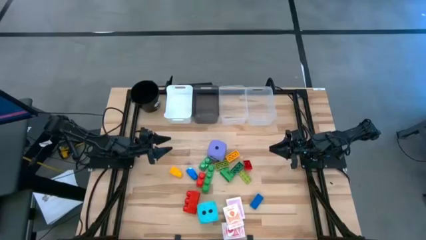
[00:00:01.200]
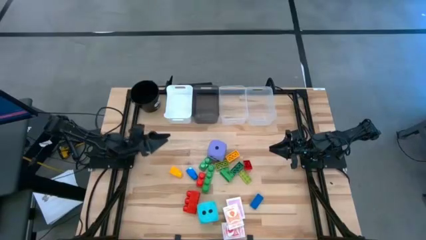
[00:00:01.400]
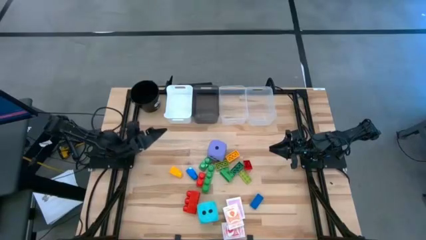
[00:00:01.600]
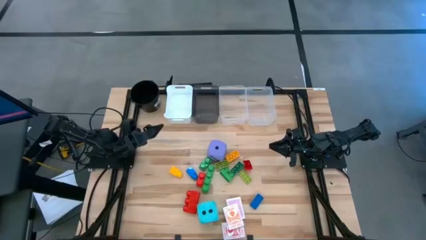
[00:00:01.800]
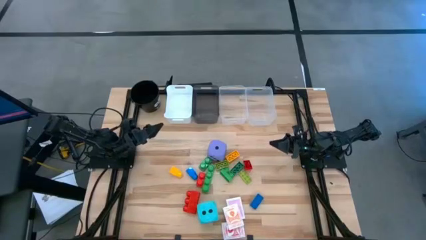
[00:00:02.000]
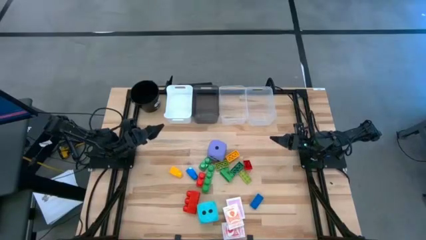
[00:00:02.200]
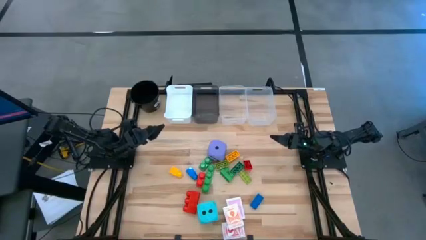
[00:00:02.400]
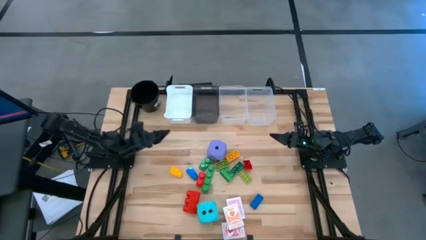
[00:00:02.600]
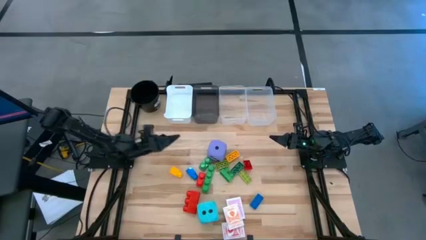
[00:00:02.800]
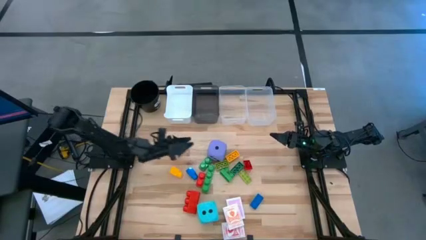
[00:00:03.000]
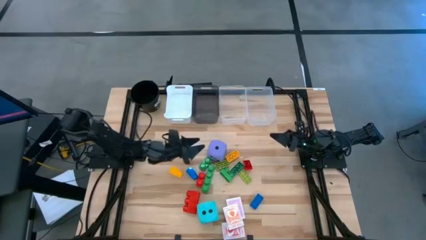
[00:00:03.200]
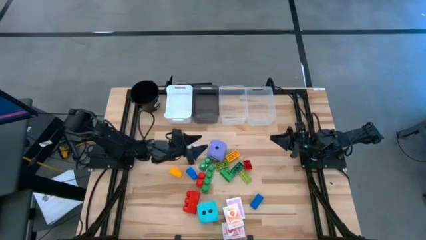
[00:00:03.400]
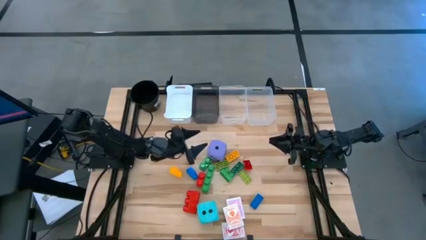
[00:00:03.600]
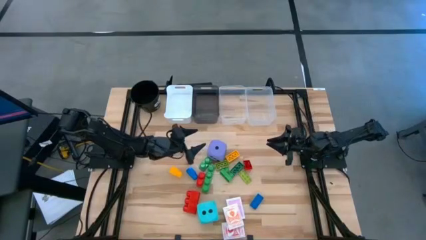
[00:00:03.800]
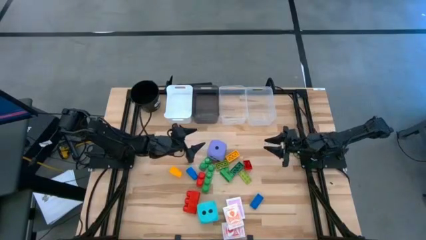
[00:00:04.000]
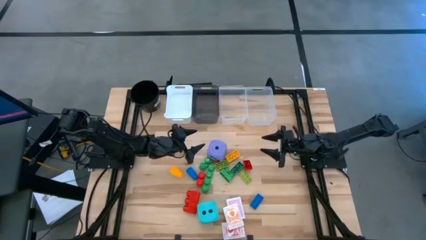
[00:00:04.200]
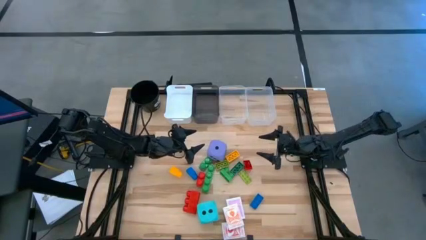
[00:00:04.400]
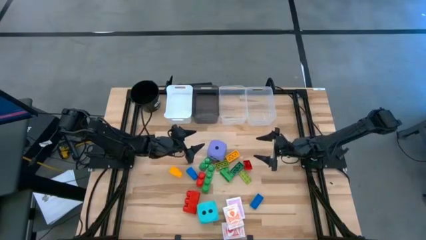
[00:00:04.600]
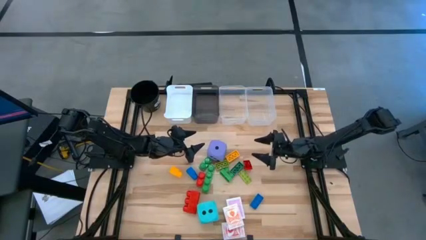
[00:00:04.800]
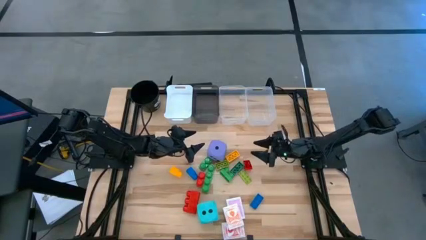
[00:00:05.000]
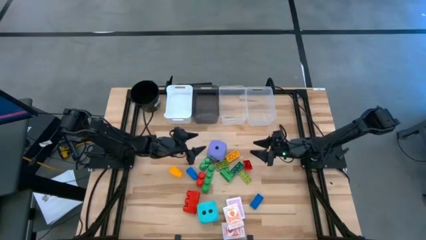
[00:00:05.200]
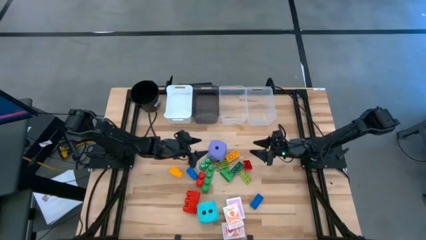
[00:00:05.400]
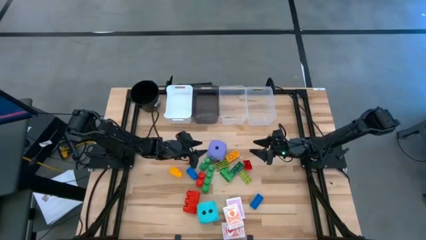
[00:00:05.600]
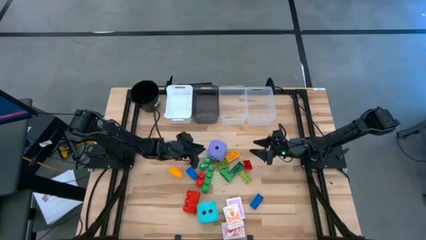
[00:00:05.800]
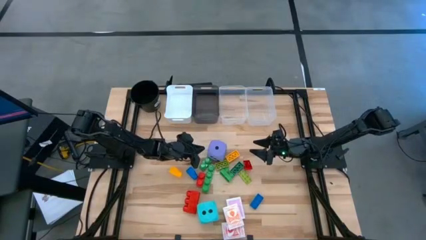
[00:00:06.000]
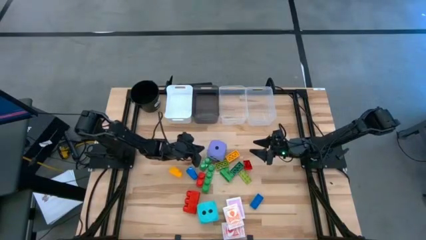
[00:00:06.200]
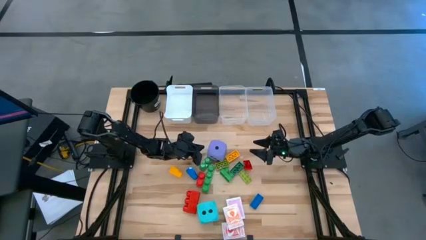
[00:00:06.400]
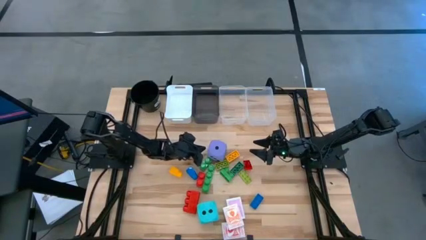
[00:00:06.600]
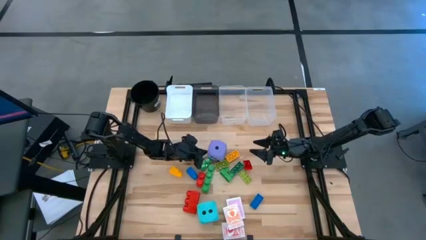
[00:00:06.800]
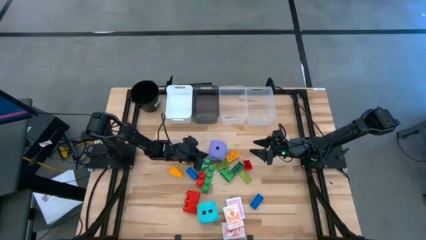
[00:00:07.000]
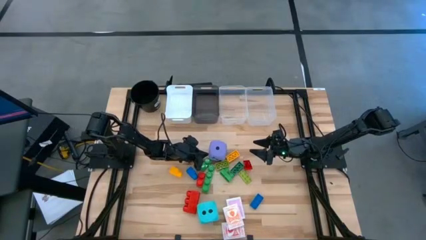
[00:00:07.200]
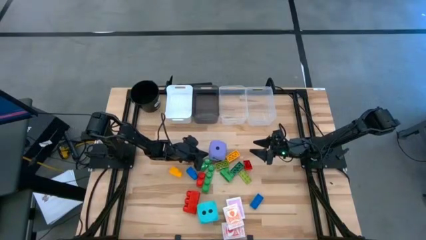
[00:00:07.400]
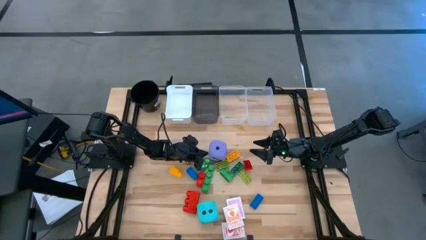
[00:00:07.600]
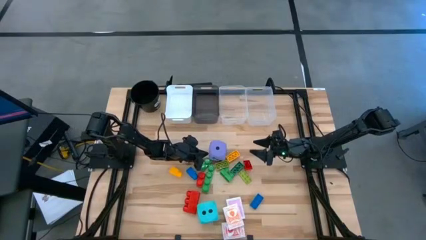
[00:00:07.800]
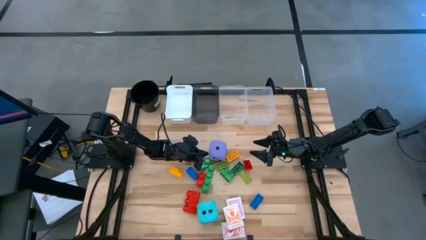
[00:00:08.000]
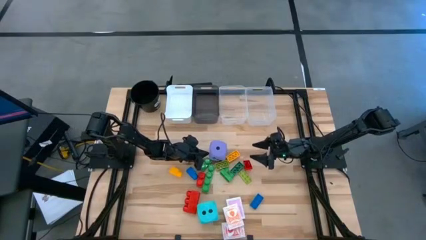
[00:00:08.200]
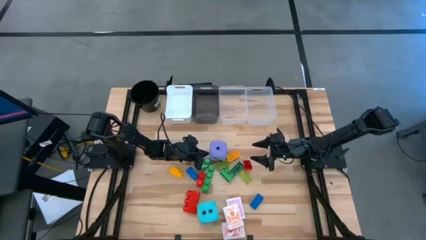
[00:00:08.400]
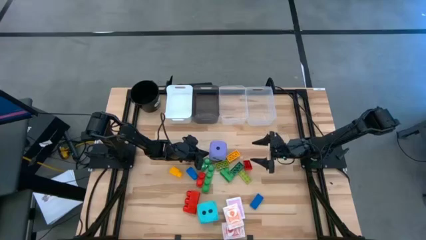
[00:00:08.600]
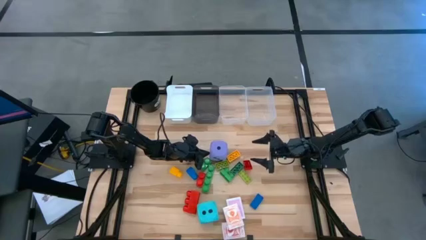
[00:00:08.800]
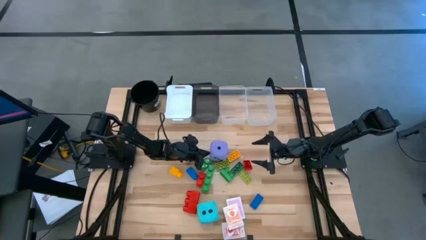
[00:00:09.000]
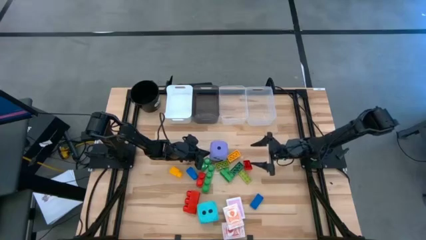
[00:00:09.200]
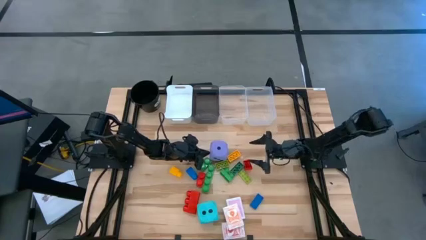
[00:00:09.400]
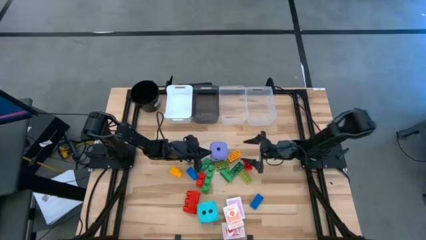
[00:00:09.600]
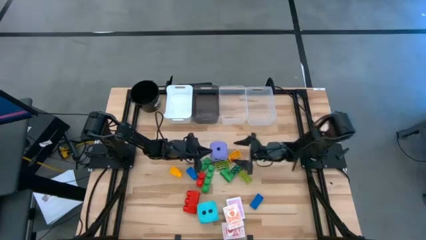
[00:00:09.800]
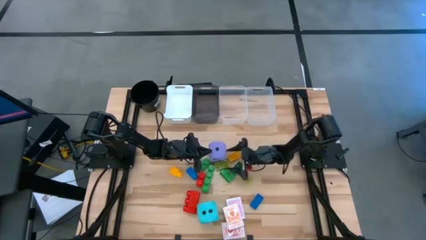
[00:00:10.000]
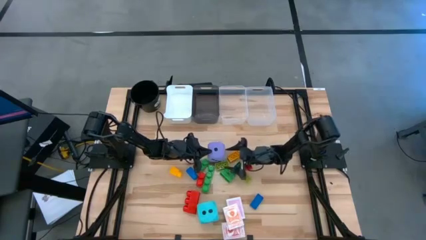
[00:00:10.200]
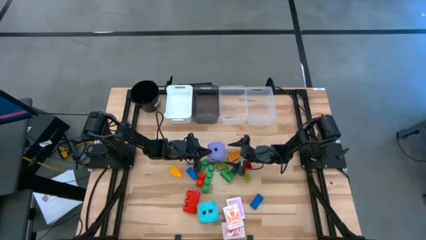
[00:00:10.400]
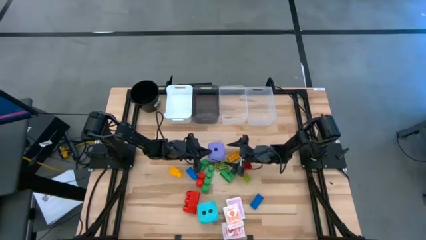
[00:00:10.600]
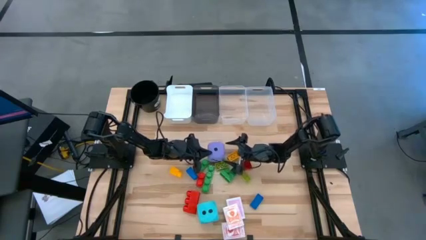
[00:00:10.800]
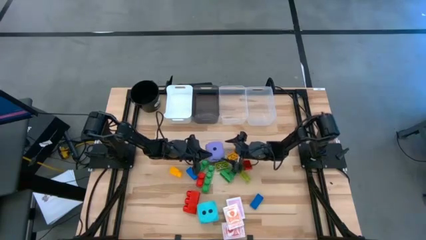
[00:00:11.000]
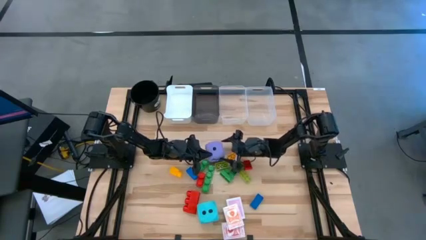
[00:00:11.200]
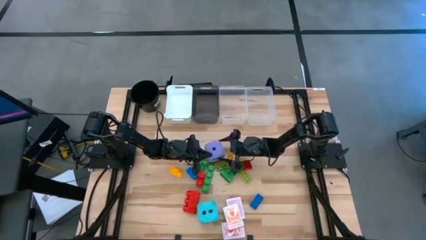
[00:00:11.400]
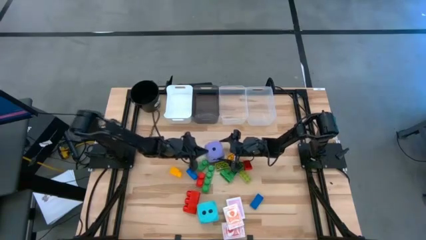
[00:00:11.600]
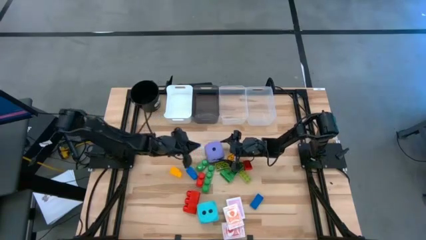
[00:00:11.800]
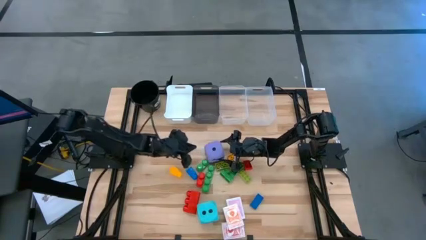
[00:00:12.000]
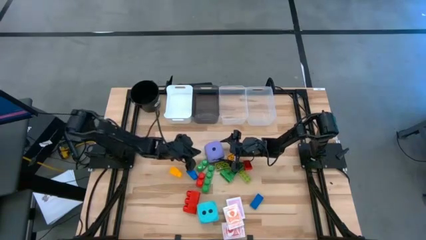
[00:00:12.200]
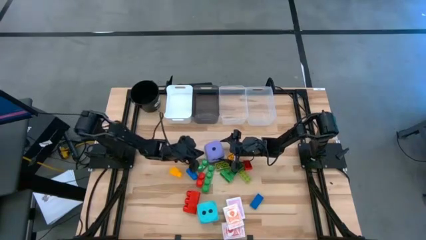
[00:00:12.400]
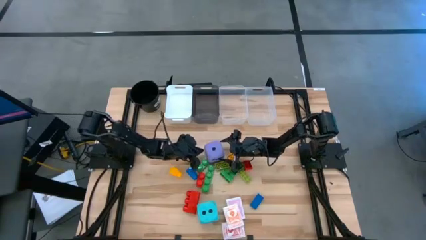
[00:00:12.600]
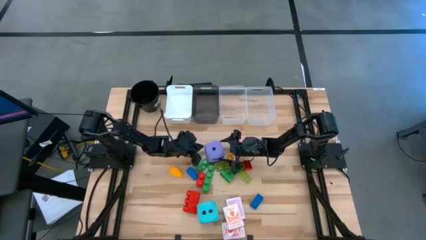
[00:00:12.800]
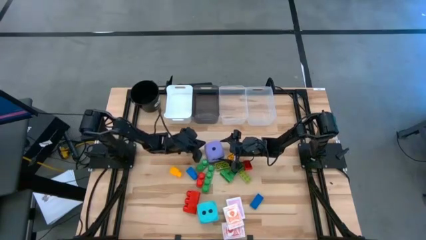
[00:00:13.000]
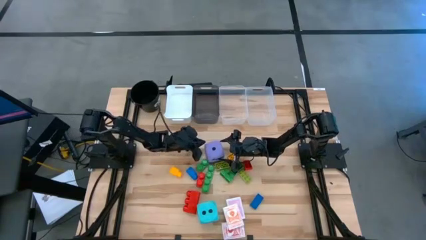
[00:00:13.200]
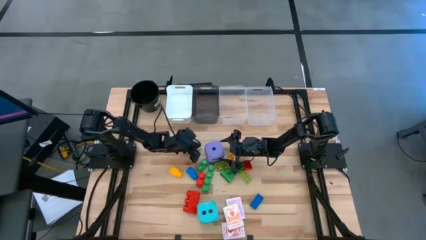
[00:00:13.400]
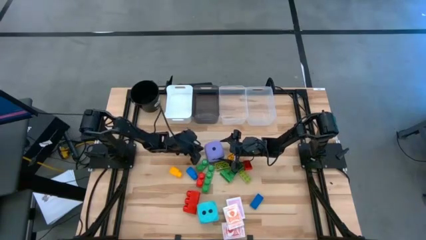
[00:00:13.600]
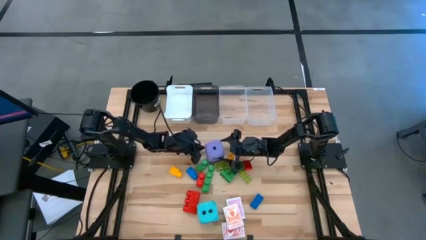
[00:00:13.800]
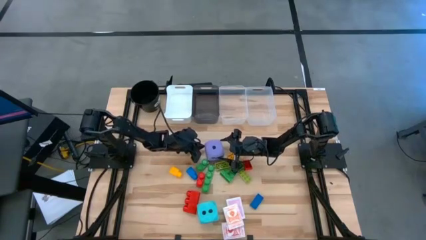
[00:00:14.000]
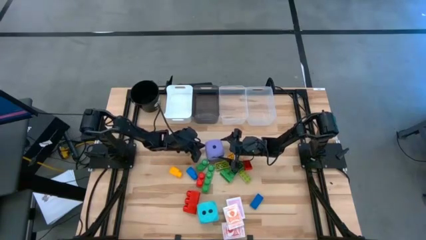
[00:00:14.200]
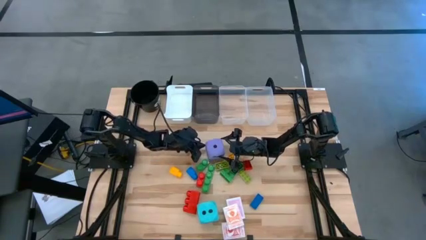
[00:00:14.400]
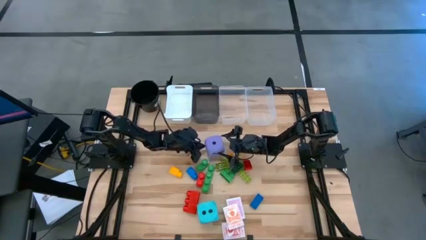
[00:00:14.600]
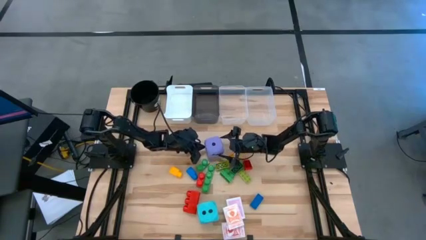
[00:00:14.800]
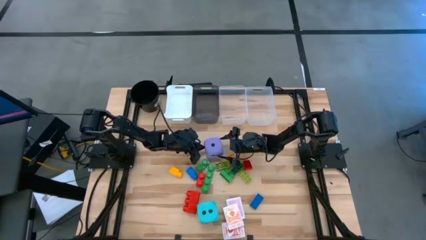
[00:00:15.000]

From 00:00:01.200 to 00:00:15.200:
Task: Pick & Place Toys
Put the purple dice into the black bin
